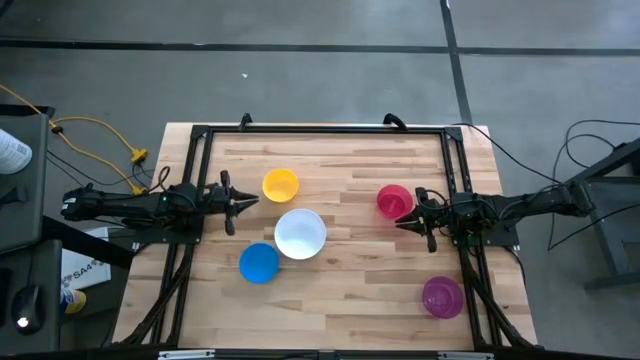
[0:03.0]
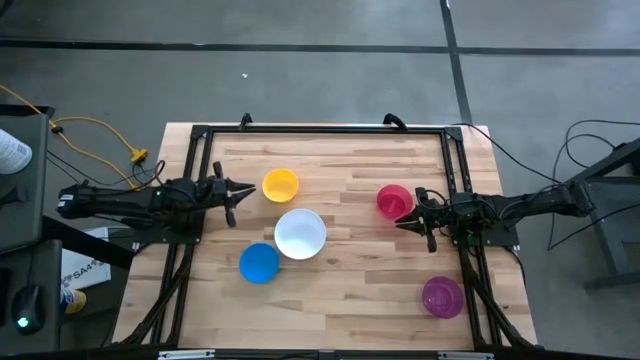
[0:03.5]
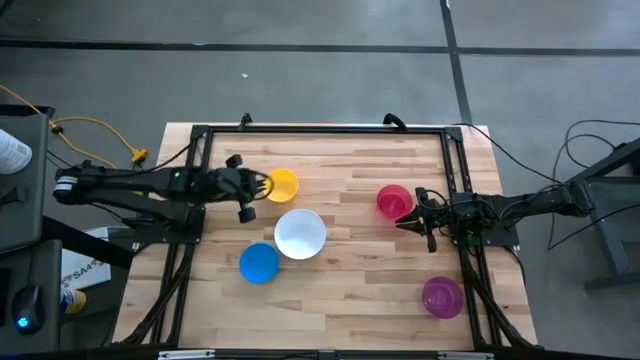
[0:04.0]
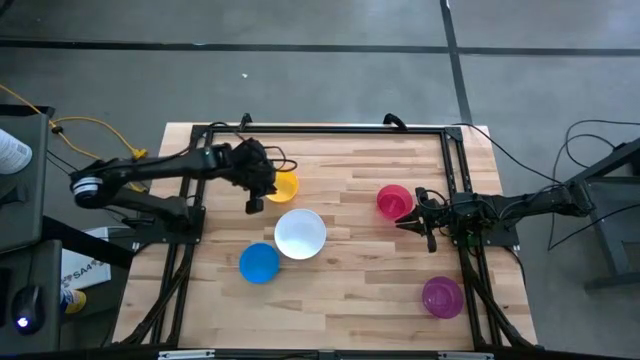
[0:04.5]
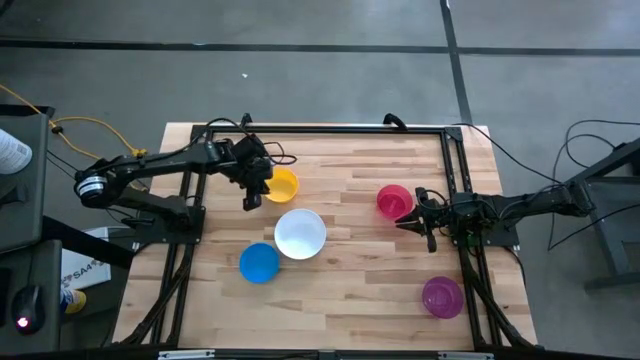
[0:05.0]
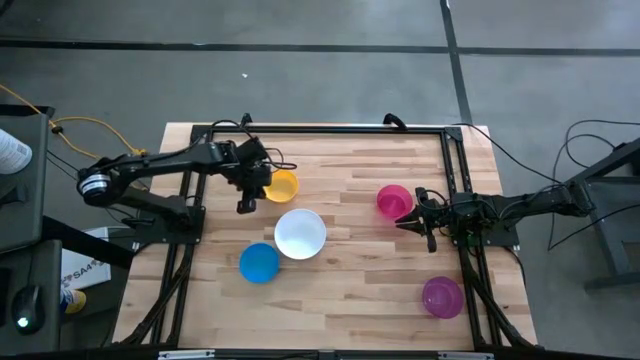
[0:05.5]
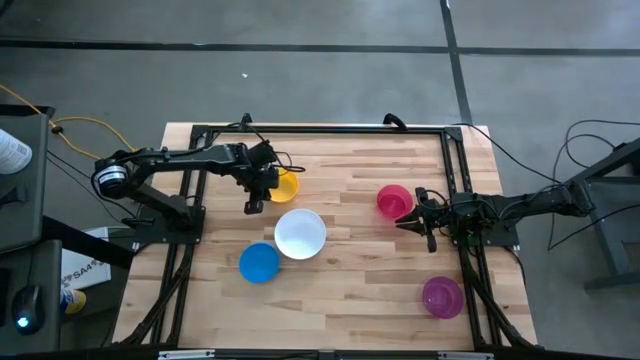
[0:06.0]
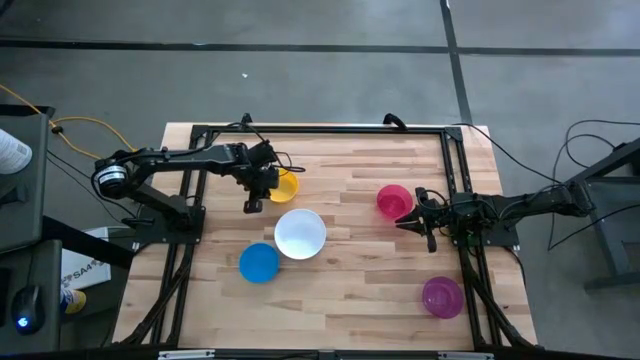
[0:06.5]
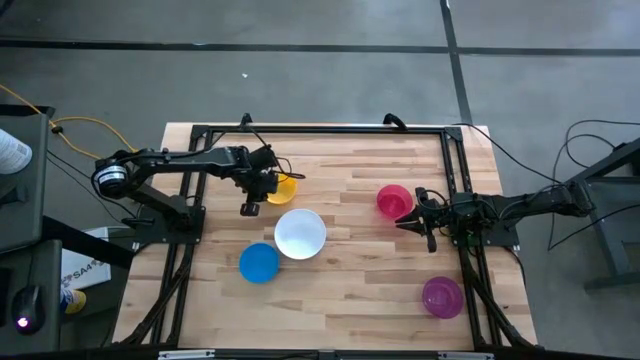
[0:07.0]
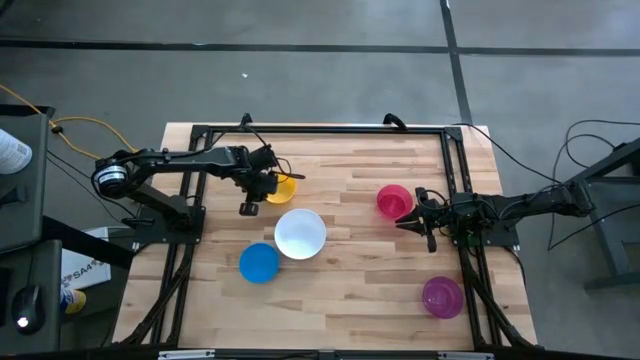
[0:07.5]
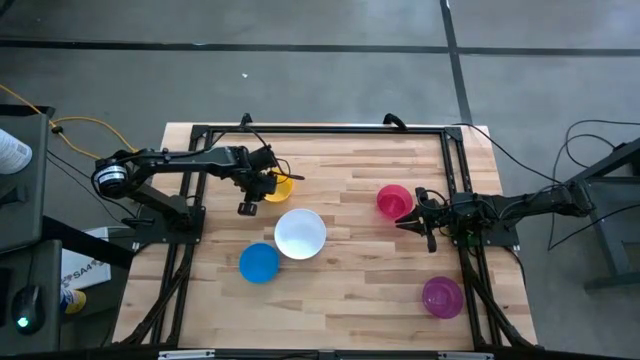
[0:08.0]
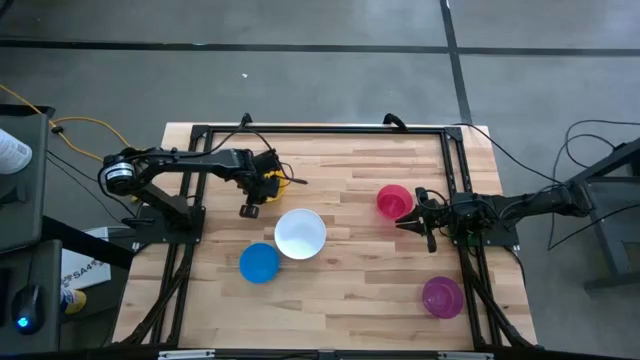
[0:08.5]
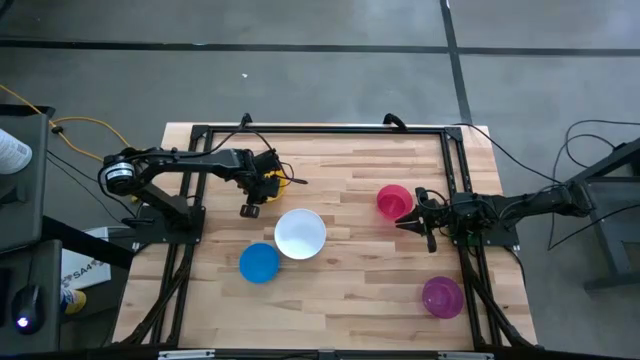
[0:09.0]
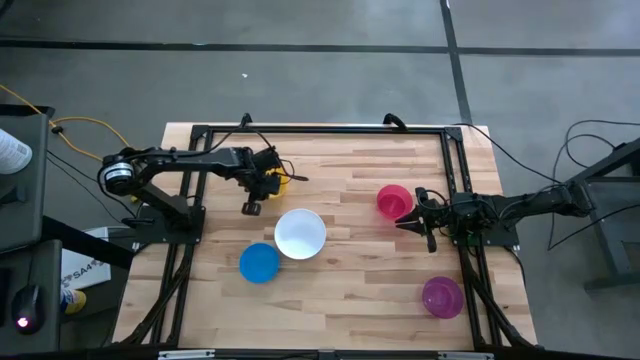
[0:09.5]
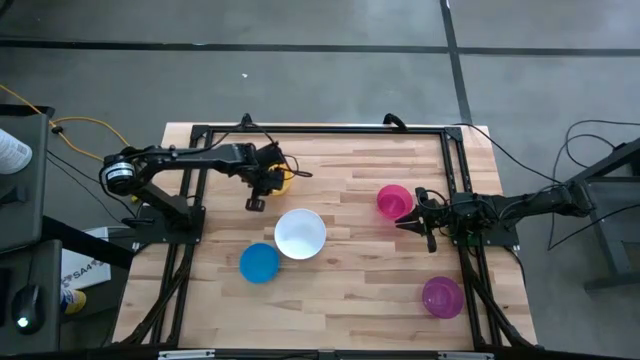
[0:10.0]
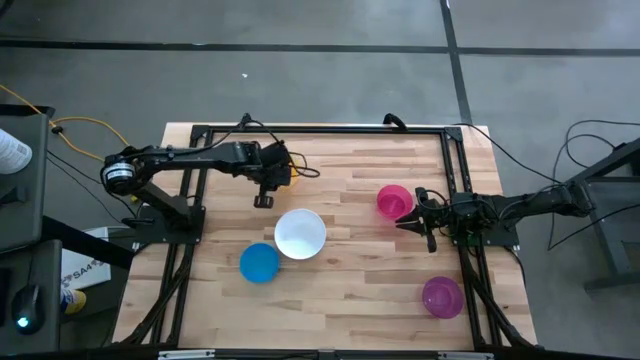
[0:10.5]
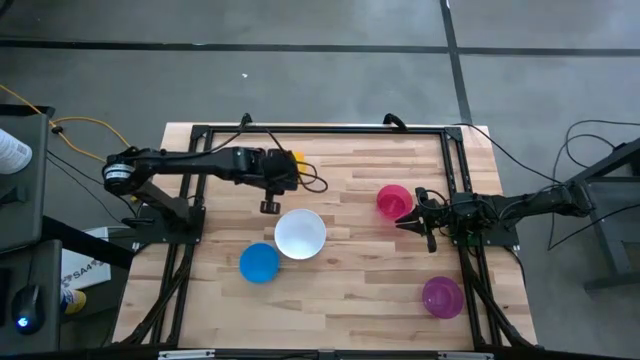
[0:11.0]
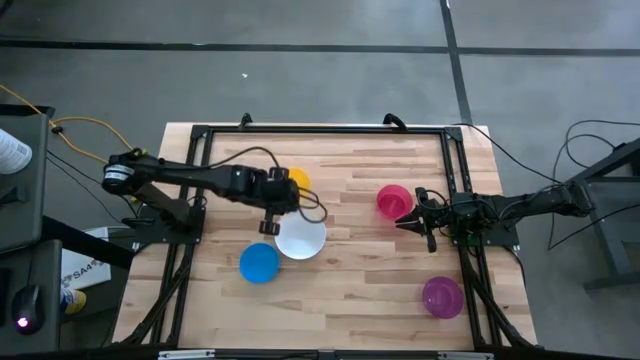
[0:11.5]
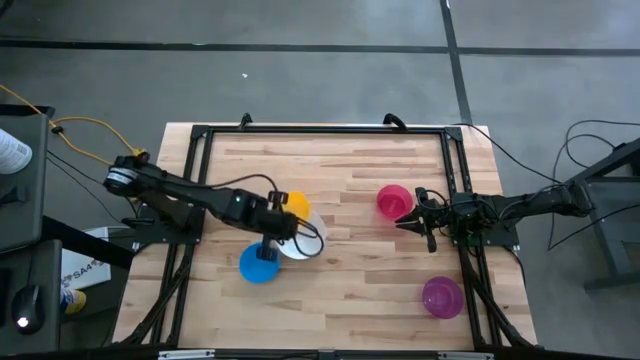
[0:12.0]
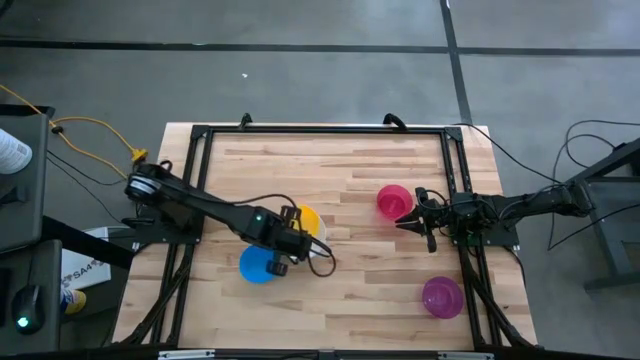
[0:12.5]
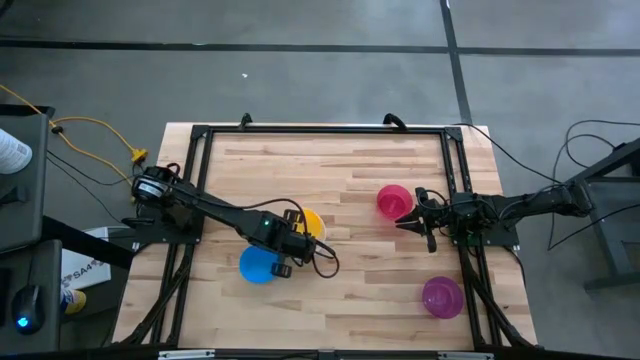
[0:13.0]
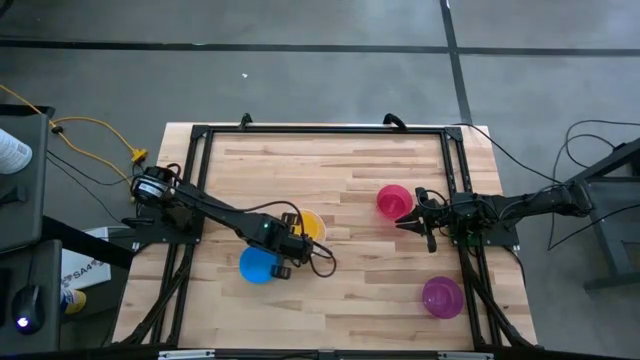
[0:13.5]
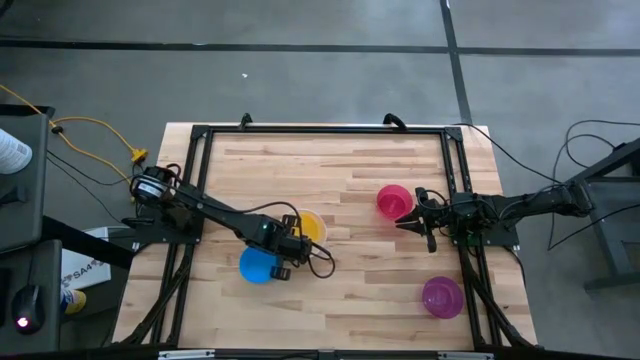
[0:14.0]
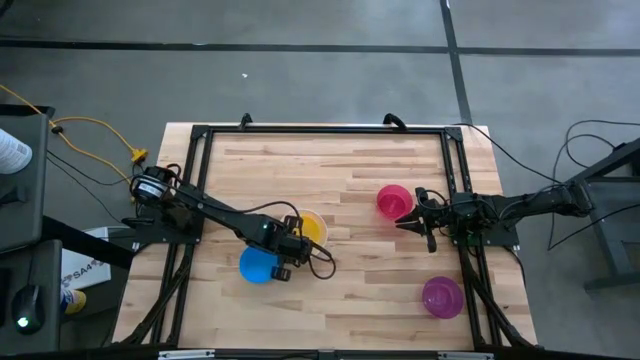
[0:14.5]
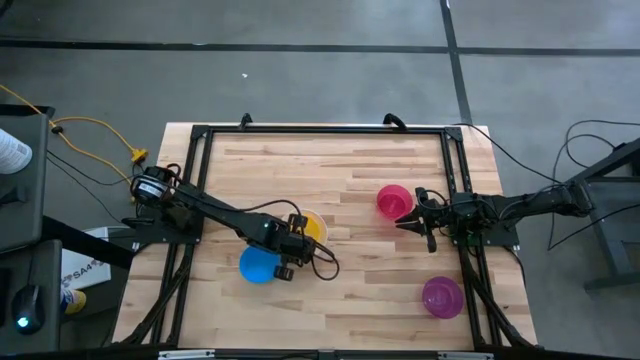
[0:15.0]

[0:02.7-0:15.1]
Stack the yellow bowl on top of the white bowl on the table

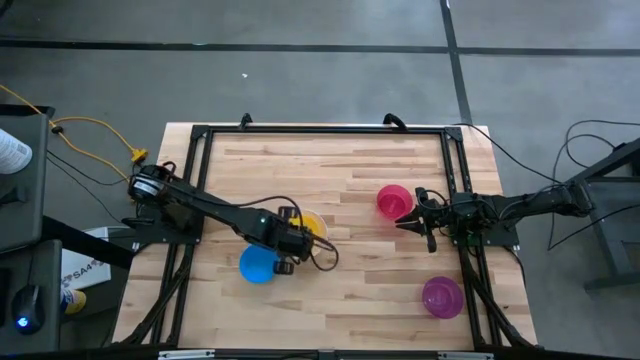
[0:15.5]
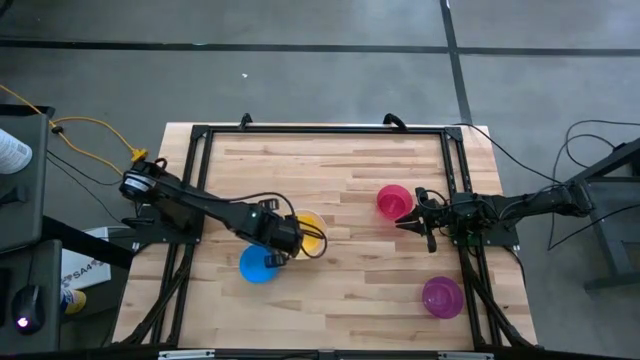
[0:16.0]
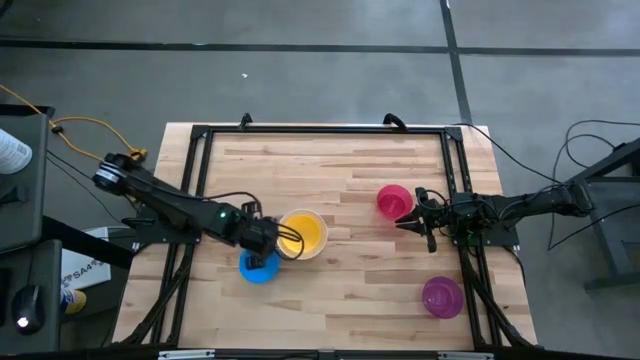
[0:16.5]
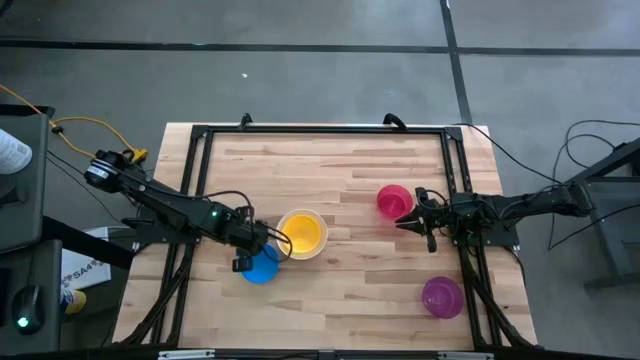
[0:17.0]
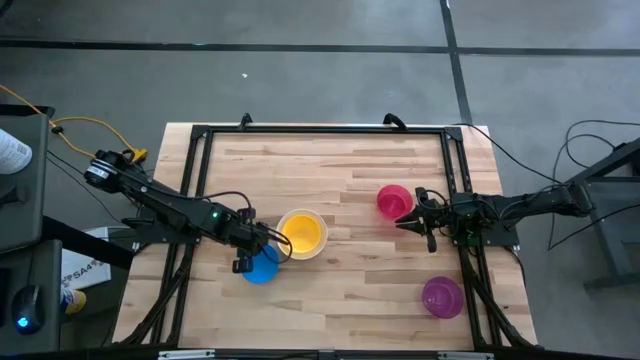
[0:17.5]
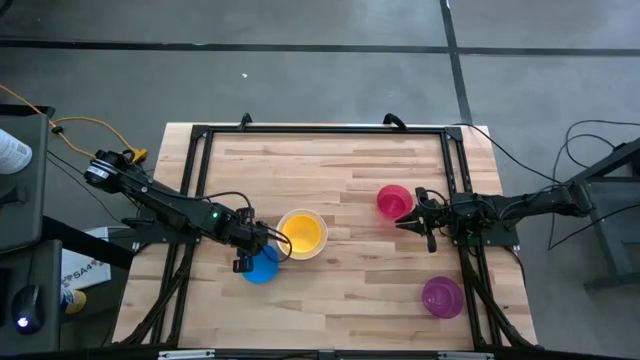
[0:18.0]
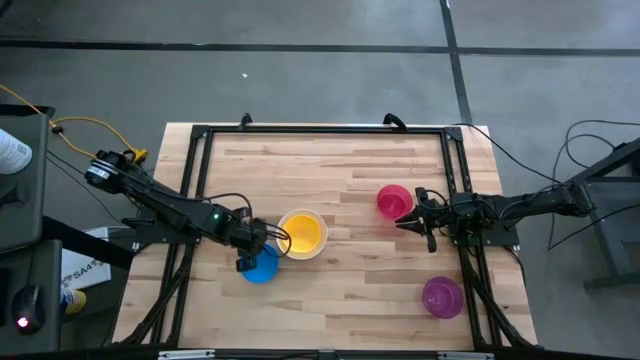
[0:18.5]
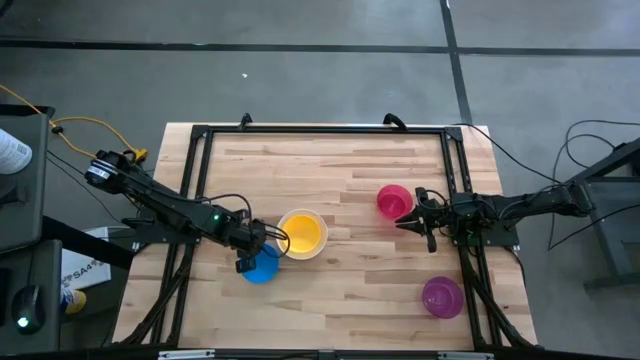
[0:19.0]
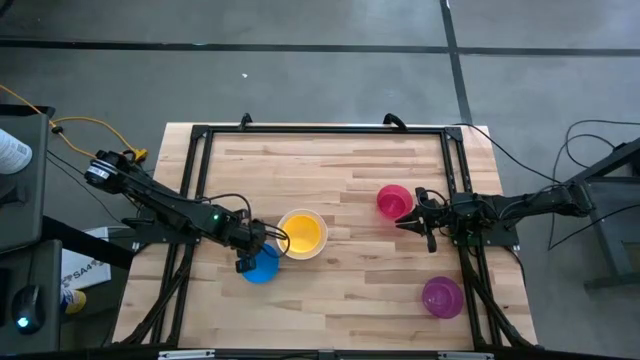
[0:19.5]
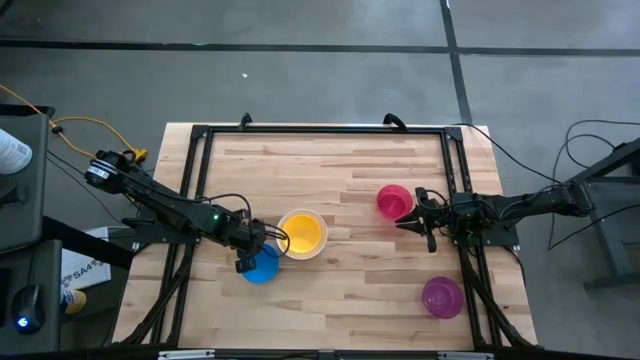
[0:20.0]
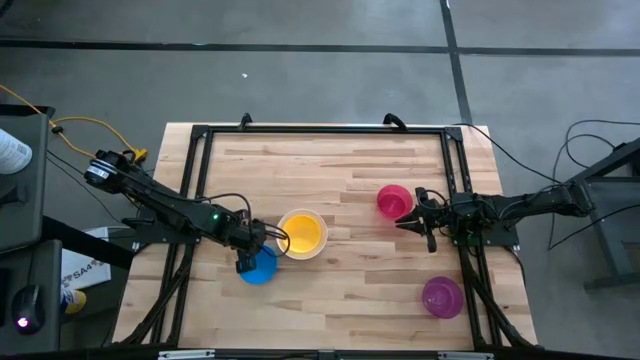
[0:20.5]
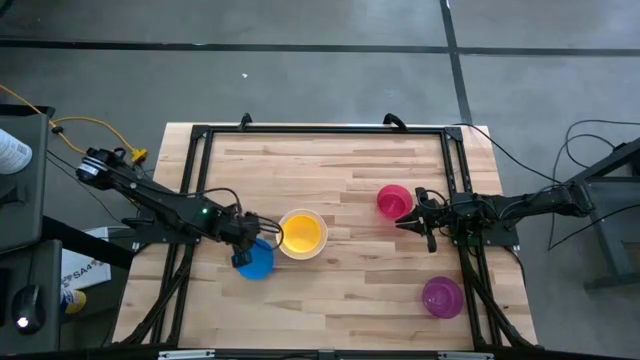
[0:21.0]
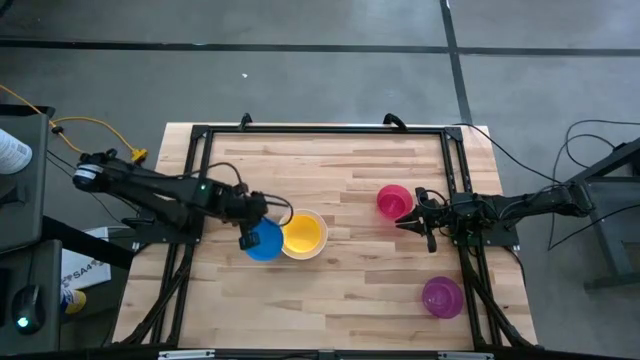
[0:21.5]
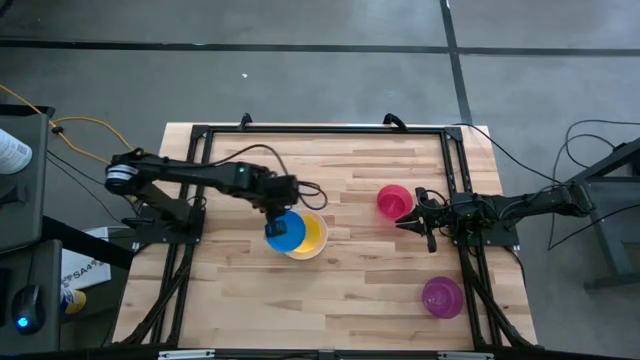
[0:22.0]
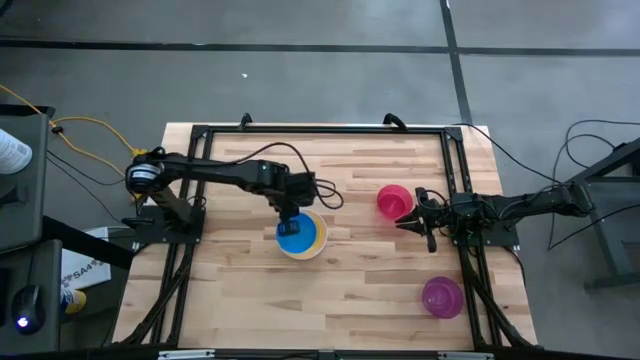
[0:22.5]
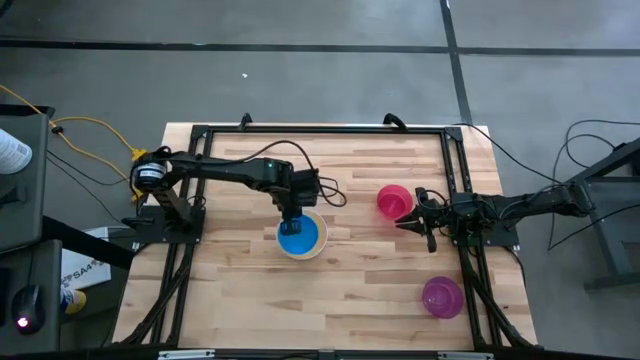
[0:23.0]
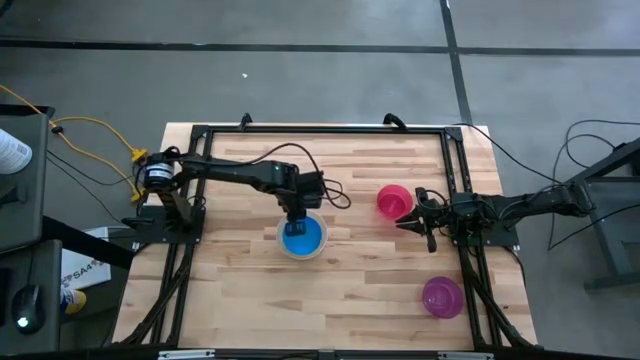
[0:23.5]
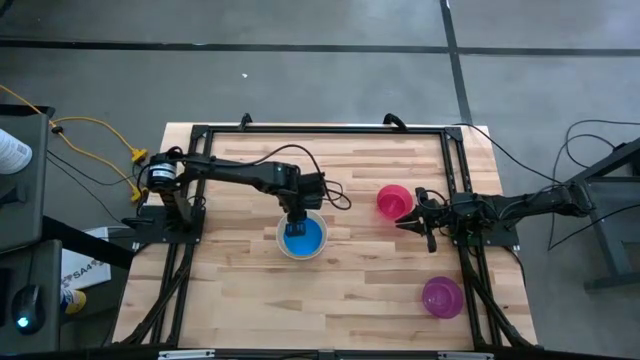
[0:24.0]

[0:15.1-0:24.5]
Stack the blue bowl on top of the yellow bowl on the table
